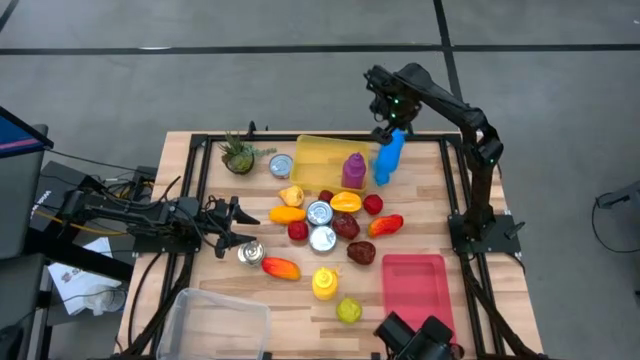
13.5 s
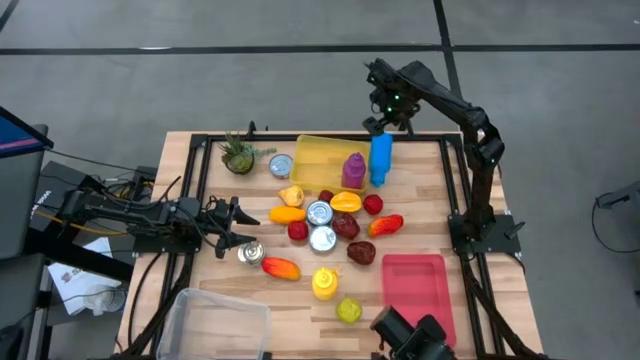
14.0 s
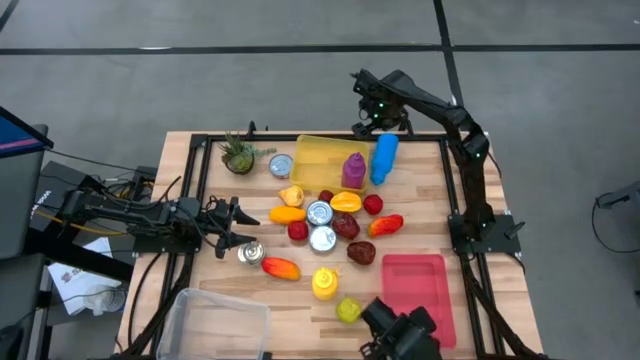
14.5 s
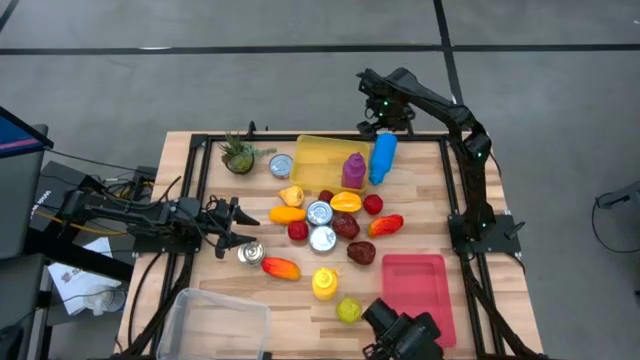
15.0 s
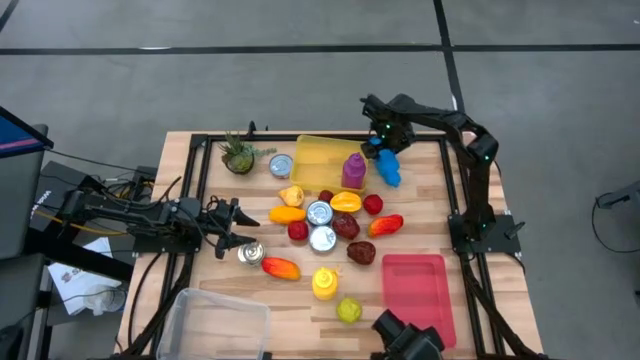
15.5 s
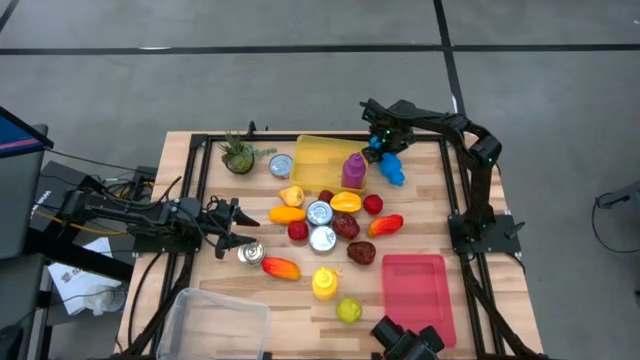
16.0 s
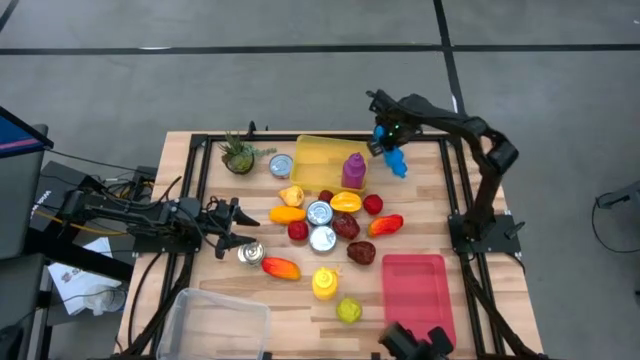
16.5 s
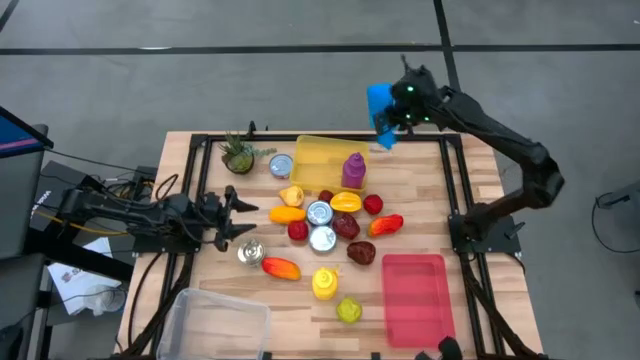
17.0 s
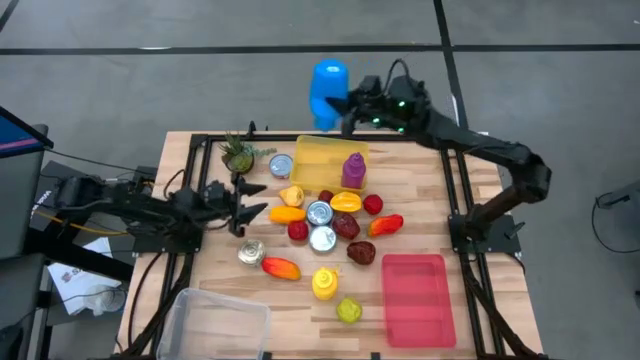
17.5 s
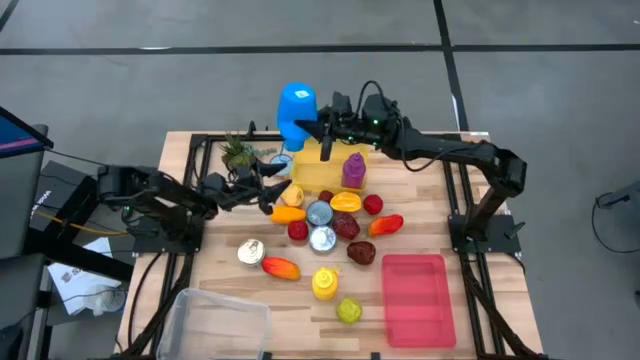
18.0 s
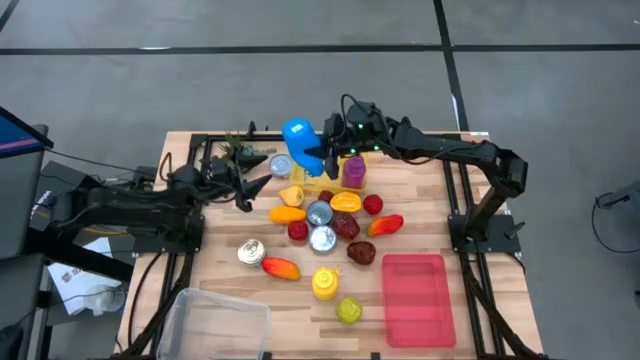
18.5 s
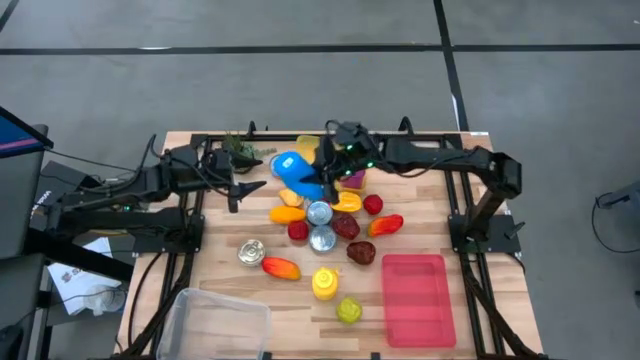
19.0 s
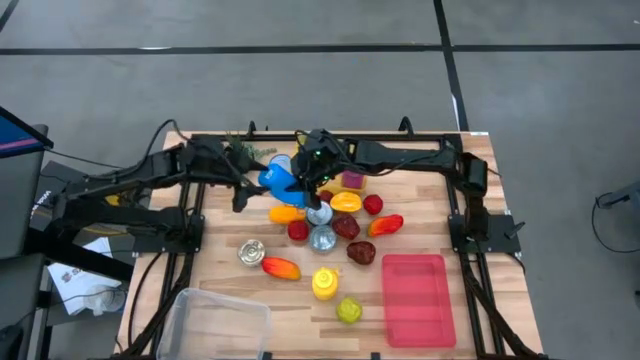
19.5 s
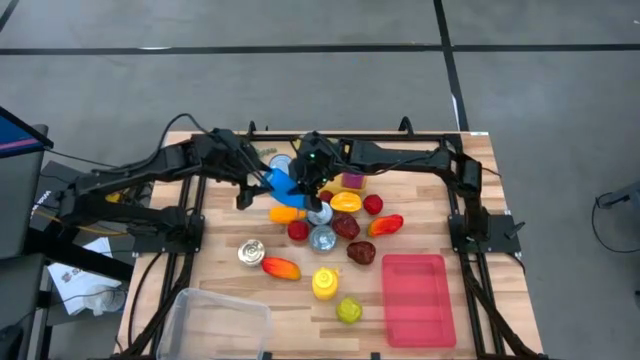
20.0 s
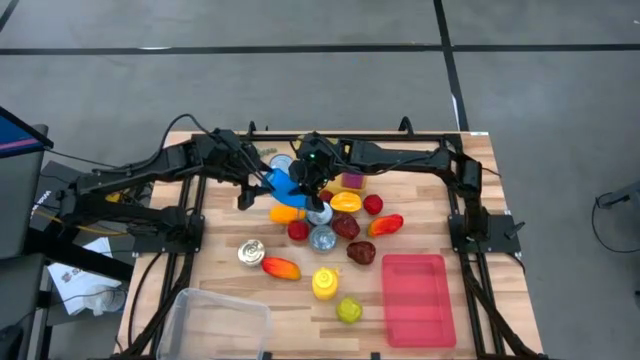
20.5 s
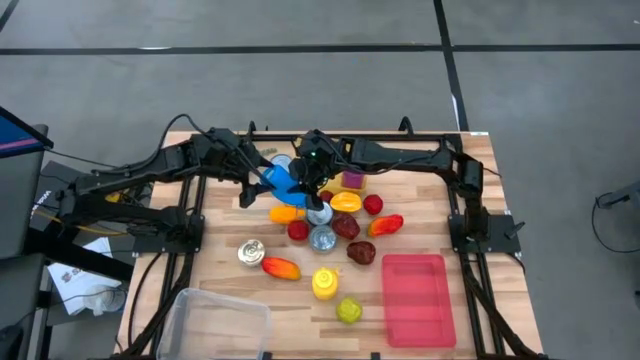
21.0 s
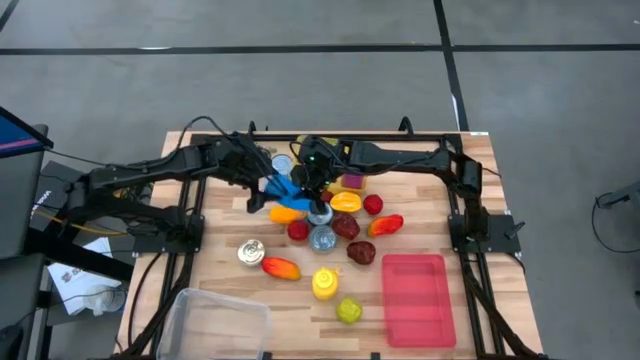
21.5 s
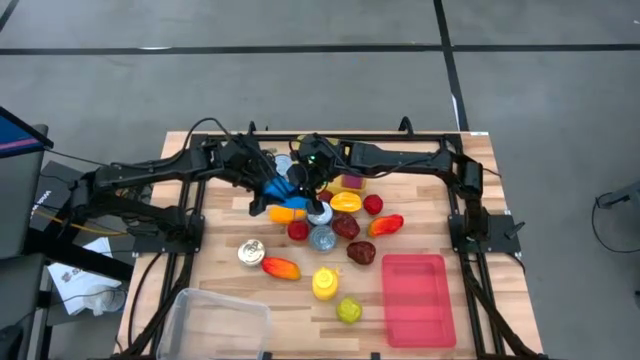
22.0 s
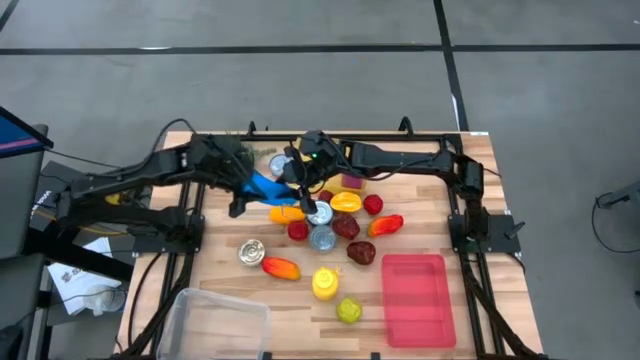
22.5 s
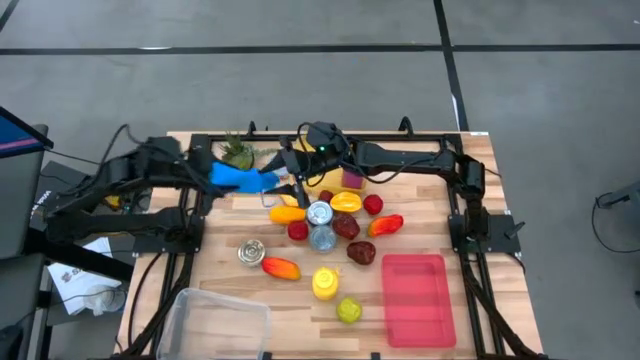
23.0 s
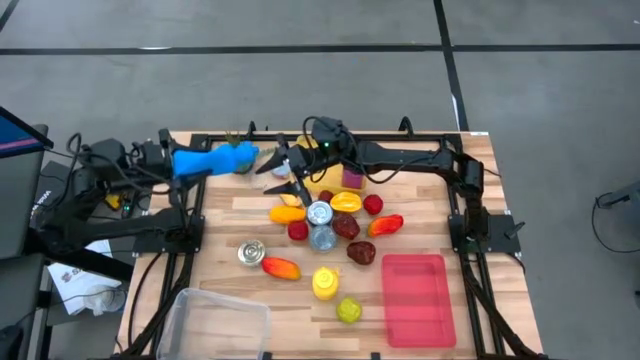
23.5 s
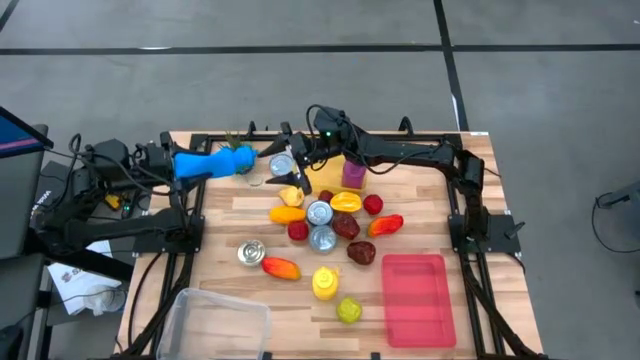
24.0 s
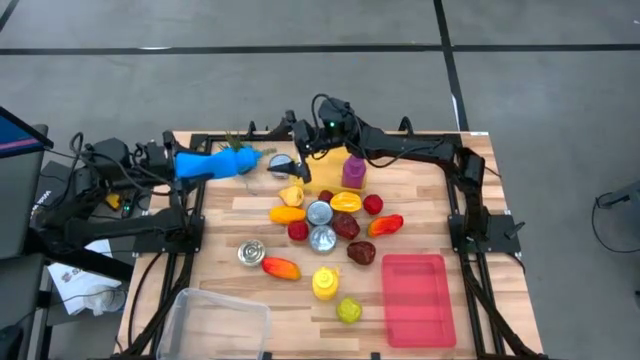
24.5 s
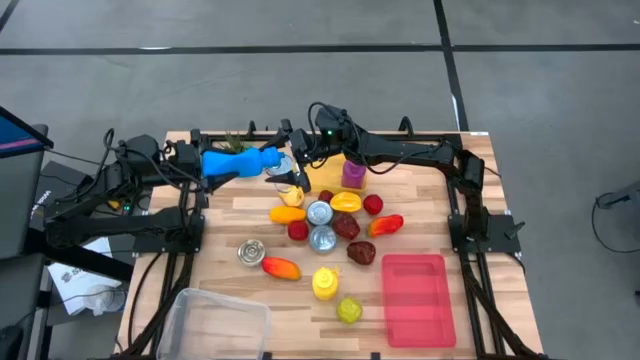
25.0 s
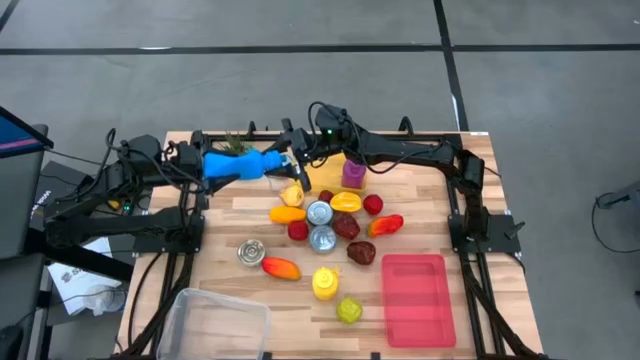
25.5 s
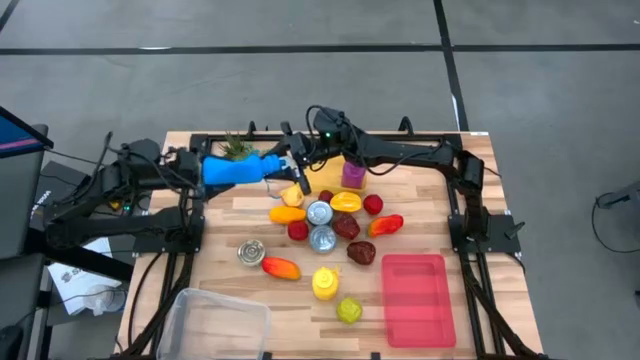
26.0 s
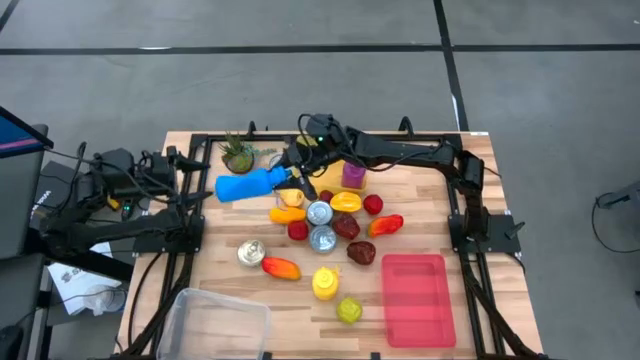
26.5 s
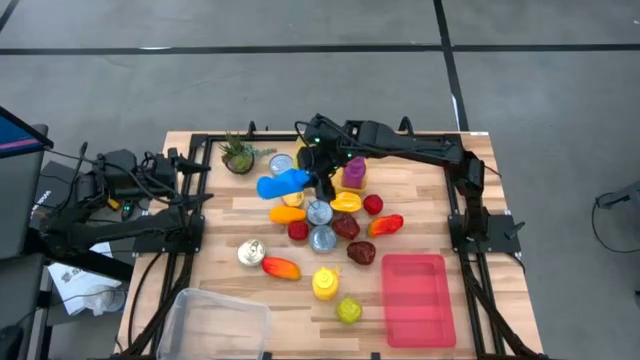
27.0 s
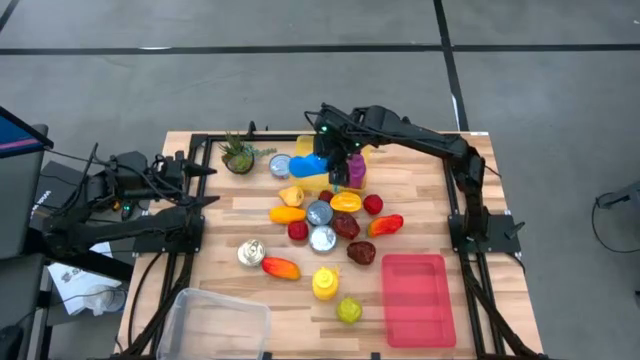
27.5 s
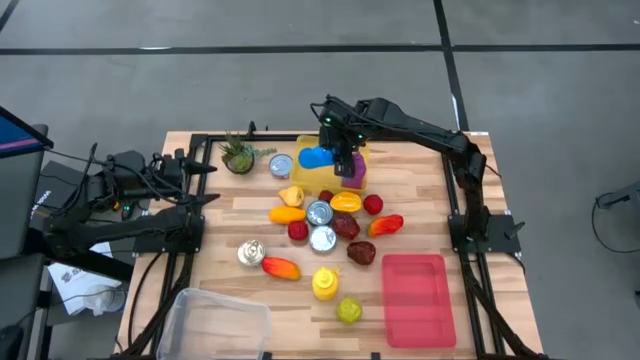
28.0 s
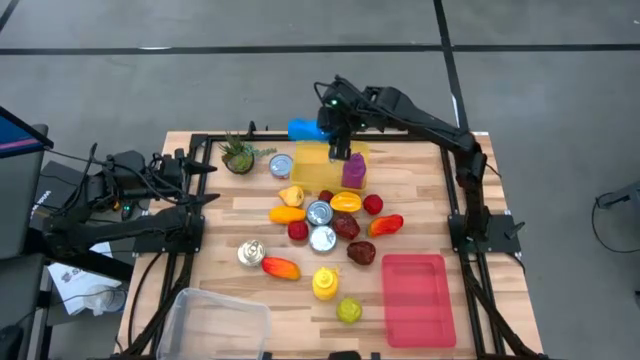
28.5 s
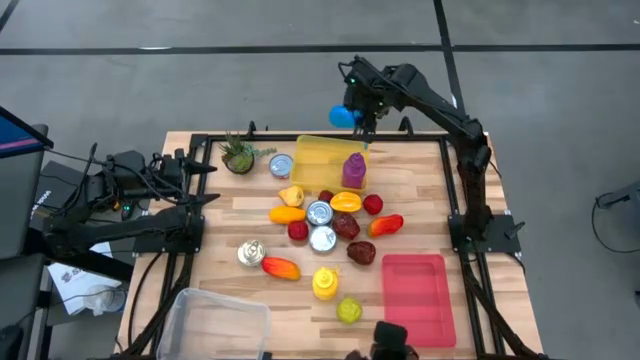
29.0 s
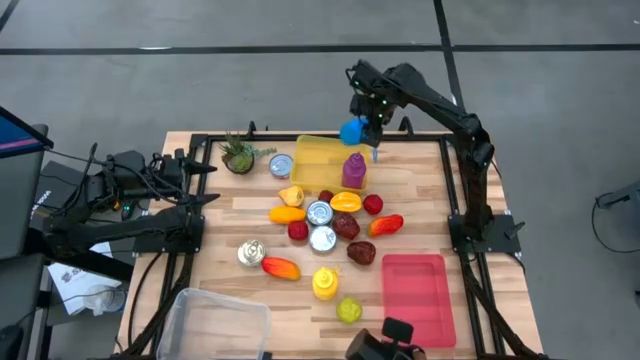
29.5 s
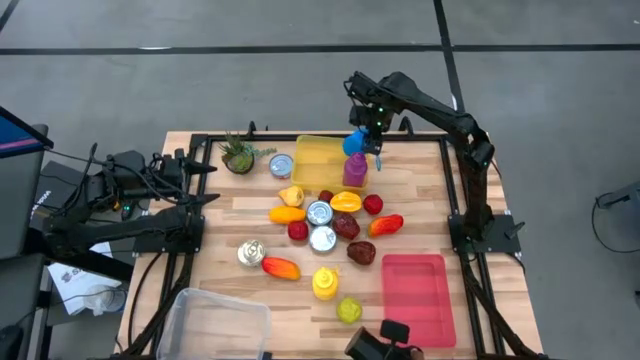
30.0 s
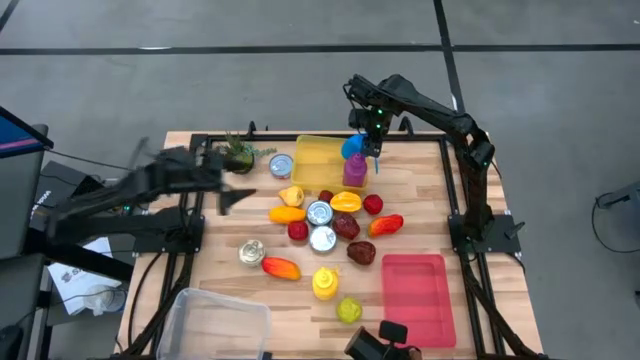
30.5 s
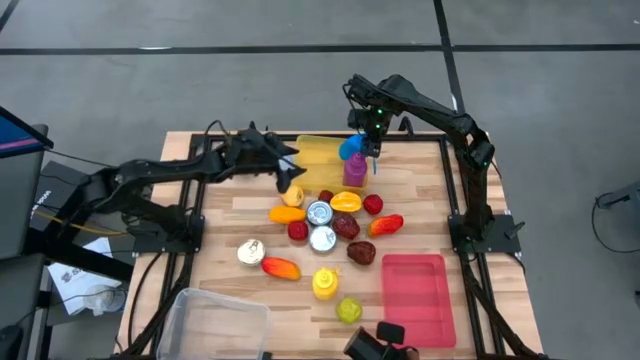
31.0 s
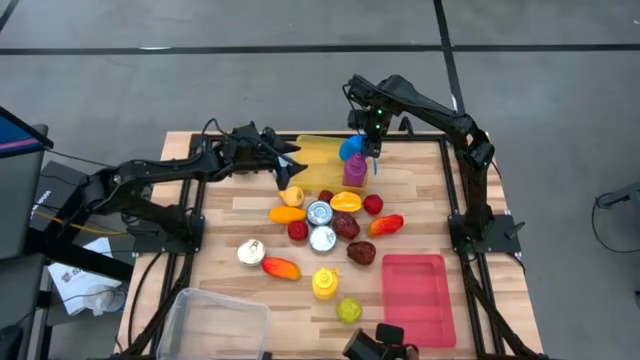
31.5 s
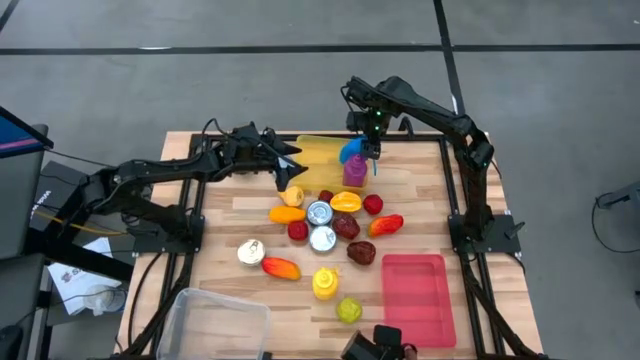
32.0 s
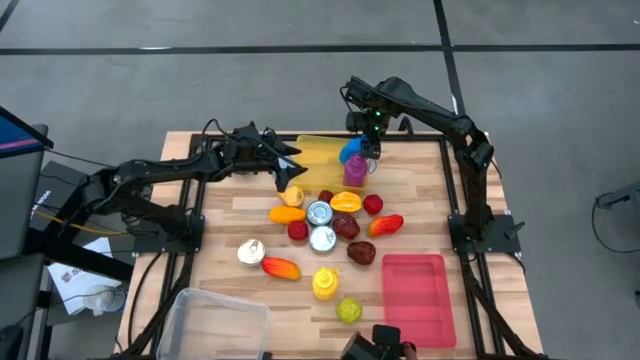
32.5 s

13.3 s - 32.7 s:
Task: Pick & Place Food Item
Put the blue tumbler into the yellow bin

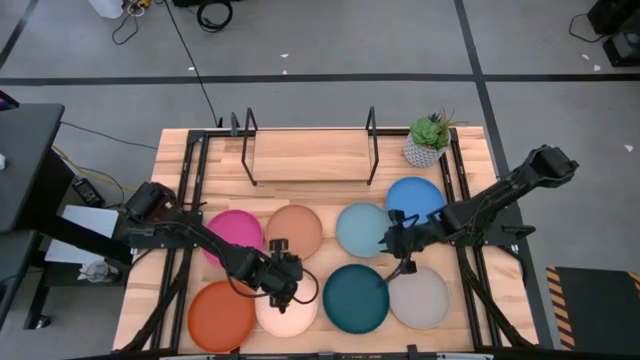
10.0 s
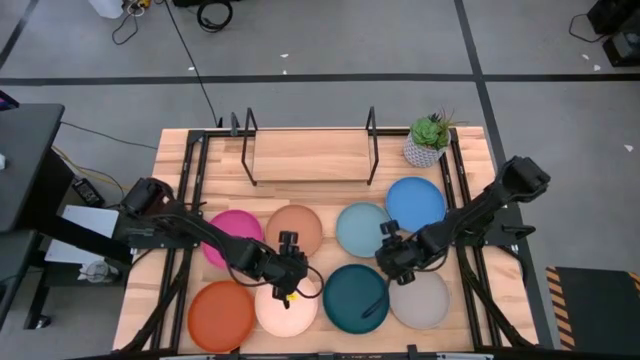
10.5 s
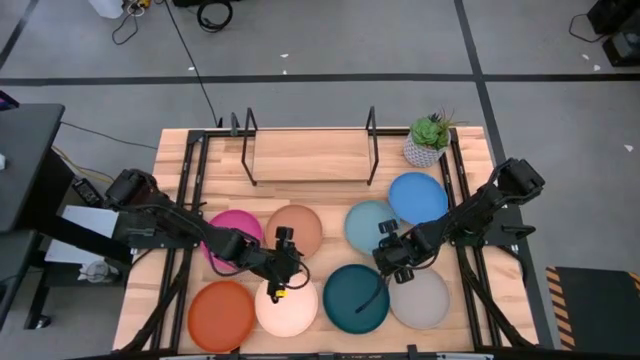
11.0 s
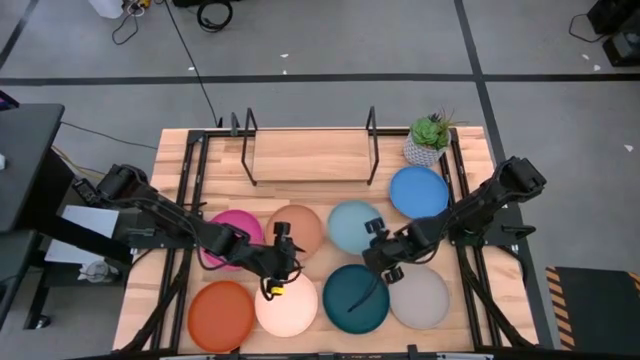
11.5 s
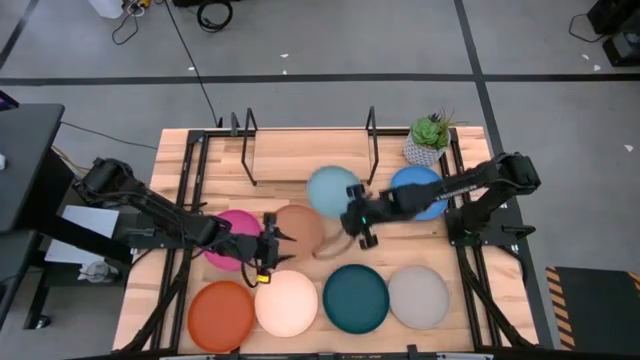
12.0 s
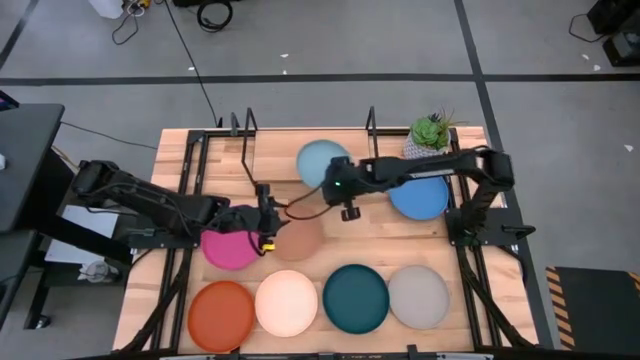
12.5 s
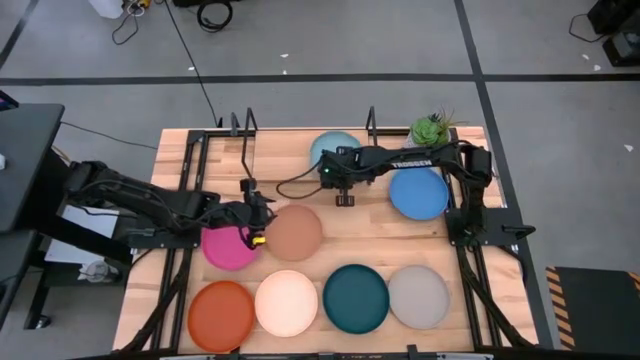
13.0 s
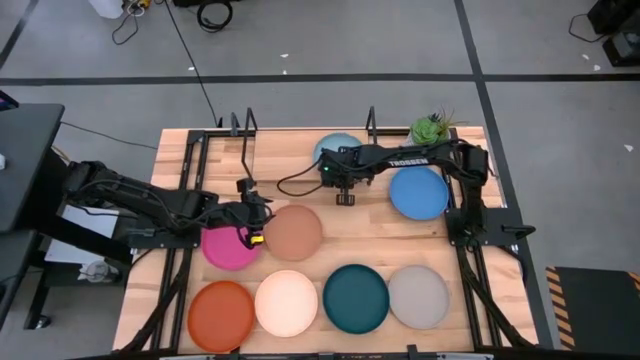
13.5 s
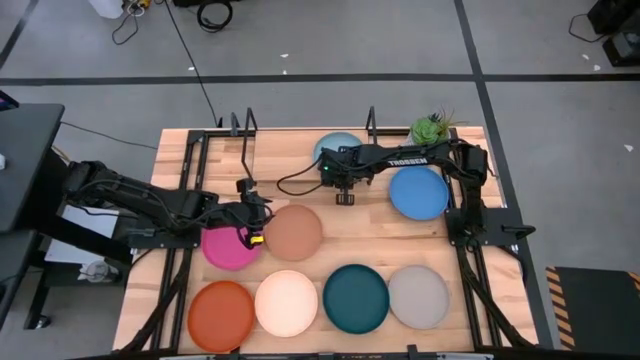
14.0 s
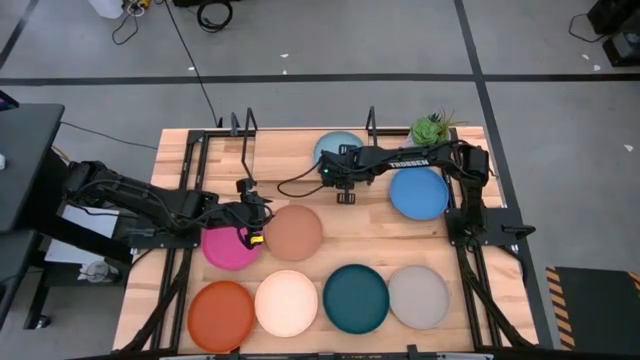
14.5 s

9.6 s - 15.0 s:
Task: Place and stack plates onto a shelf
Put the light blue plate on the shelf
